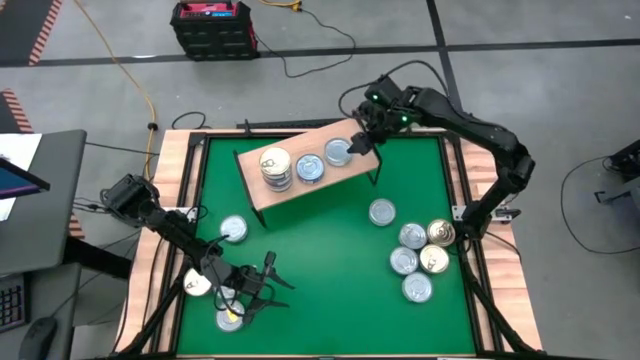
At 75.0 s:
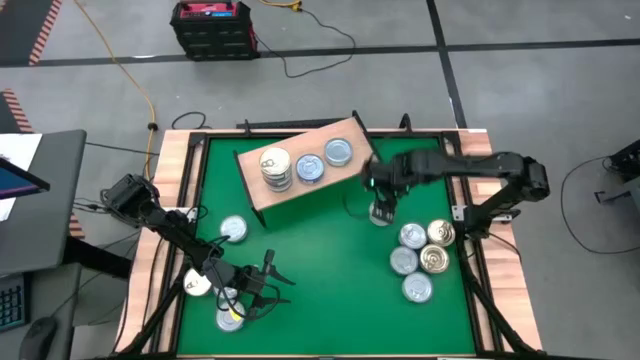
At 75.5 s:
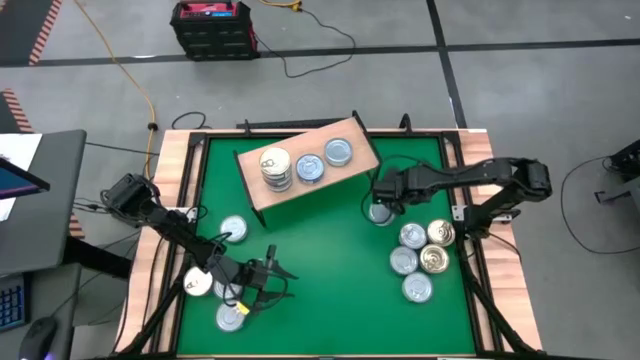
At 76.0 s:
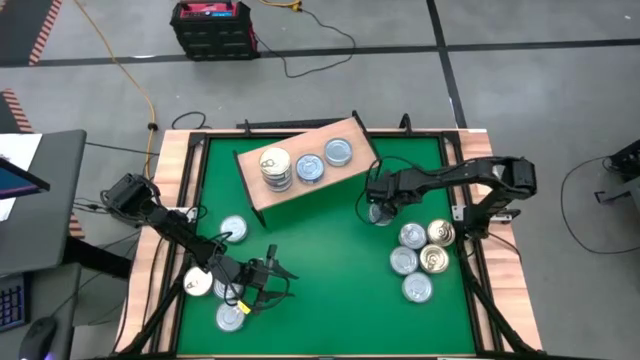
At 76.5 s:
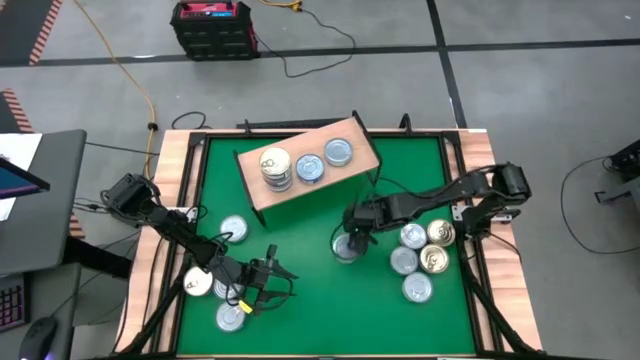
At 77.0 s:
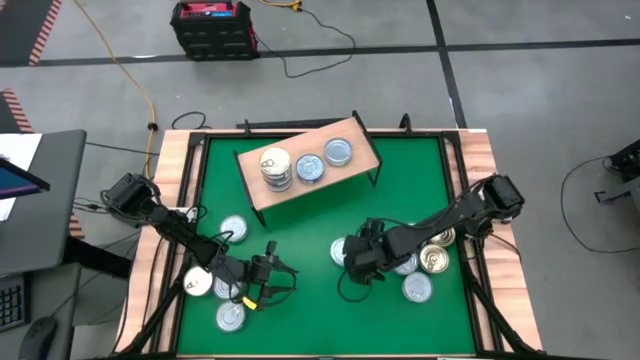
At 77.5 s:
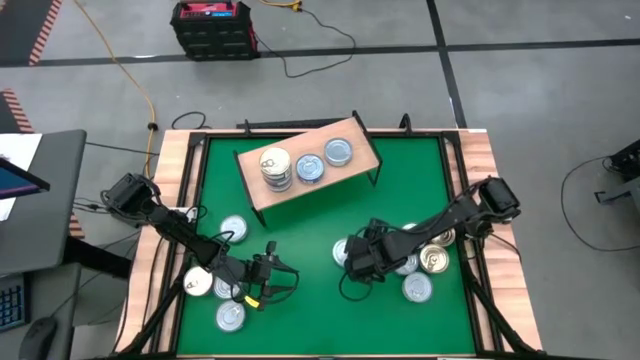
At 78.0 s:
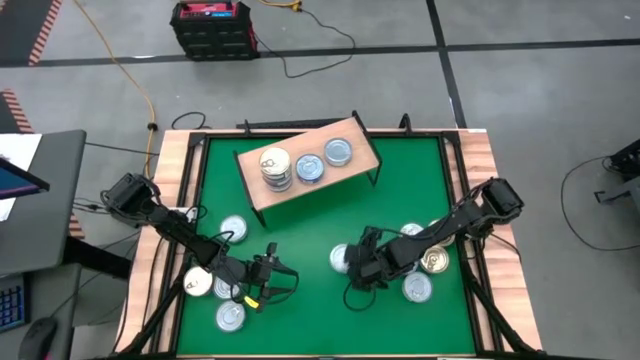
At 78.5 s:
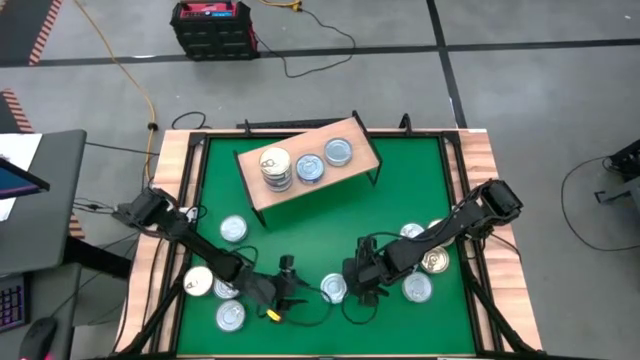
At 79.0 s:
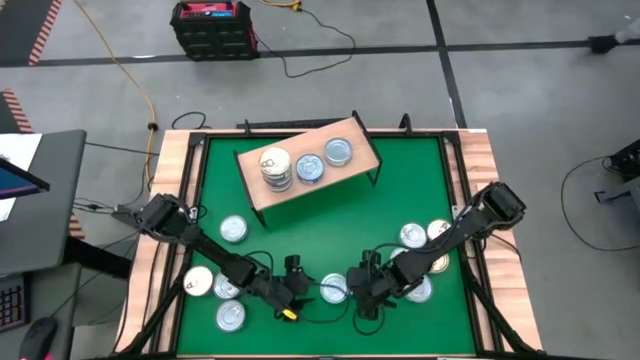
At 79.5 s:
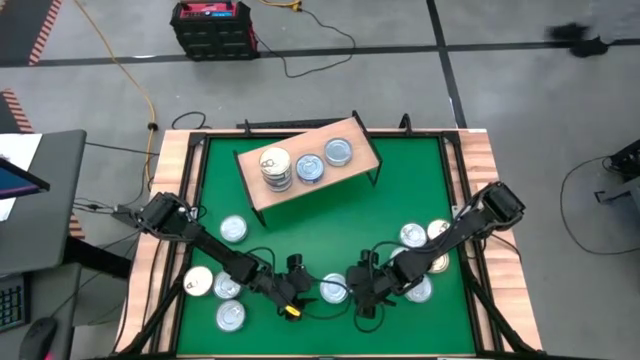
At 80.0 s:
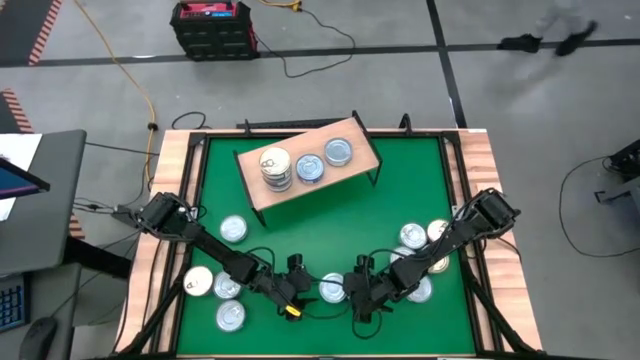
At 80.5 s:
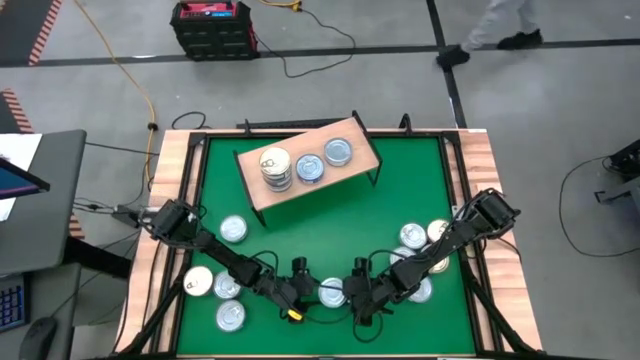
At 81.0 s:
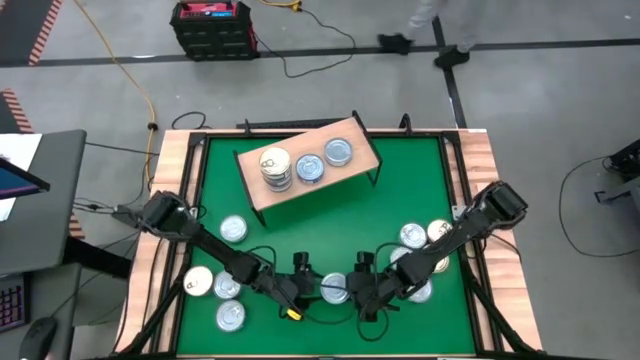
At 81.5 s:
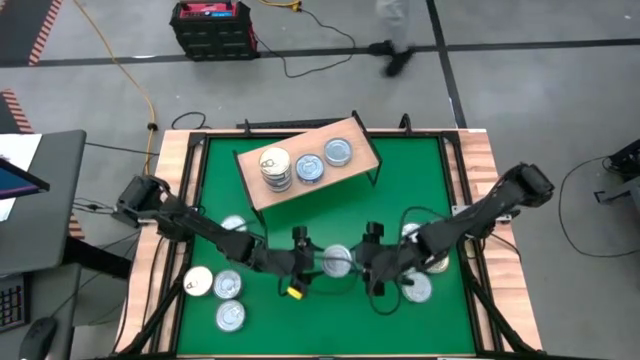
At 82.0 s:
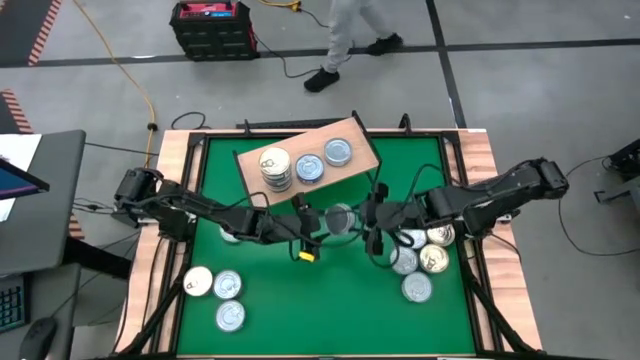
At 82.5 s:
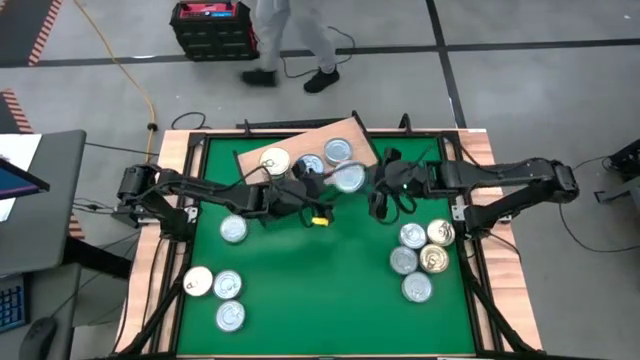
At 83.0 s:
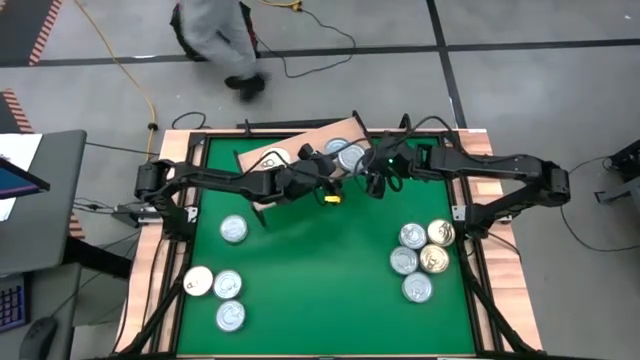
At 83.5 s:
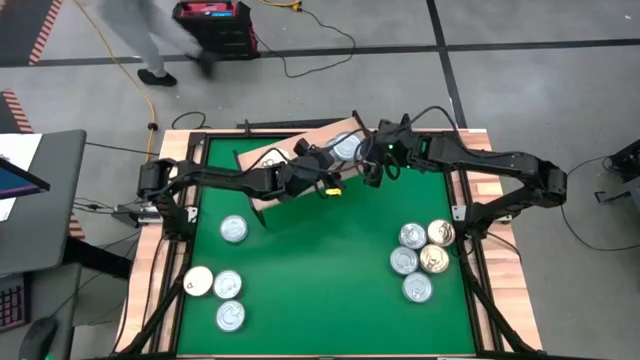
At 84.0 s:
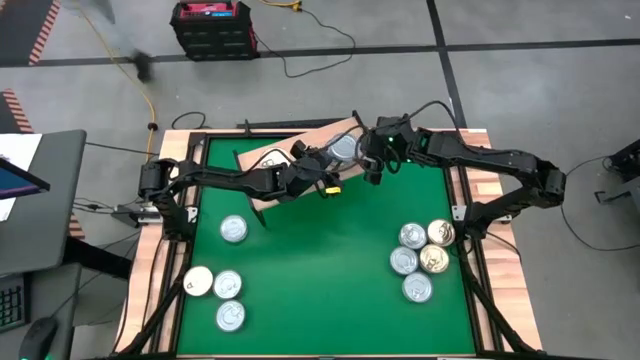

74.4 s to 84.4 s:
Task: Stack canned seafood by type on shelf
Stack the green white tuna can on top of the green white tuna can on the shelf

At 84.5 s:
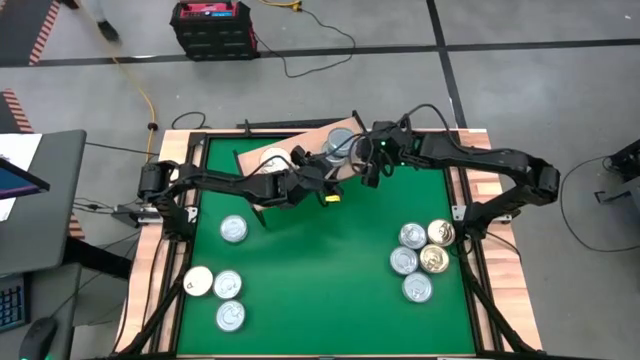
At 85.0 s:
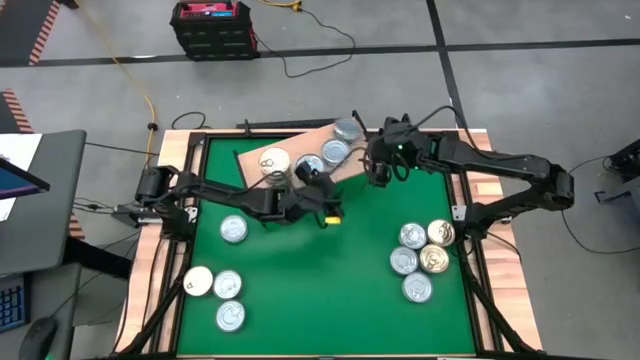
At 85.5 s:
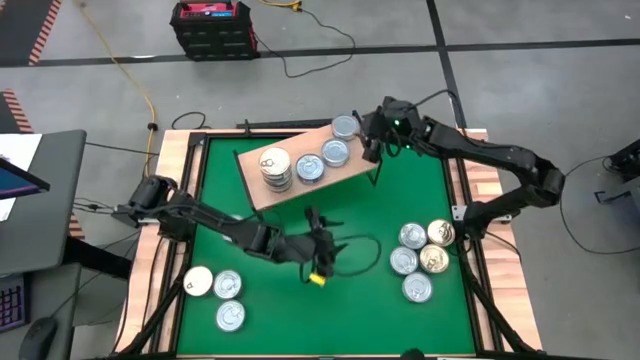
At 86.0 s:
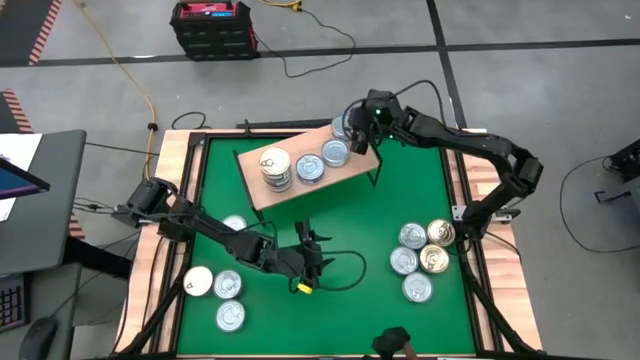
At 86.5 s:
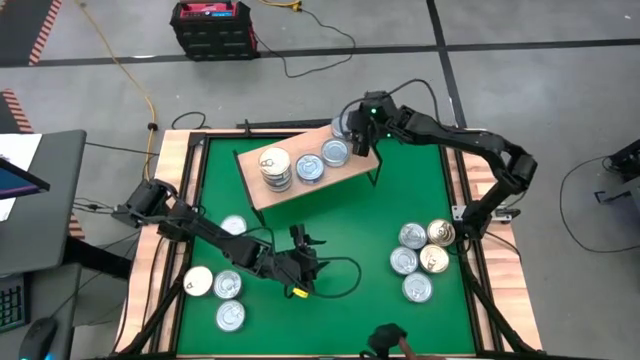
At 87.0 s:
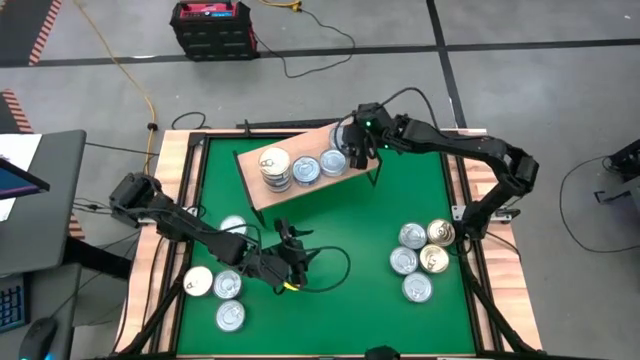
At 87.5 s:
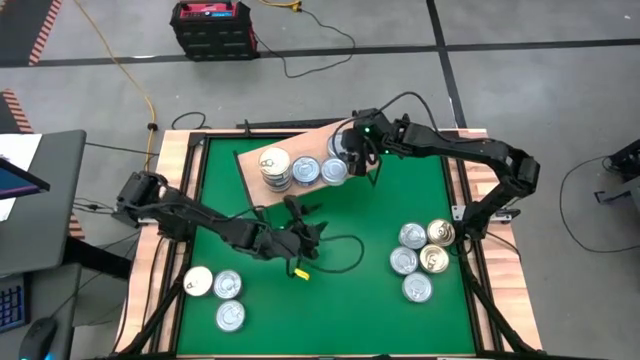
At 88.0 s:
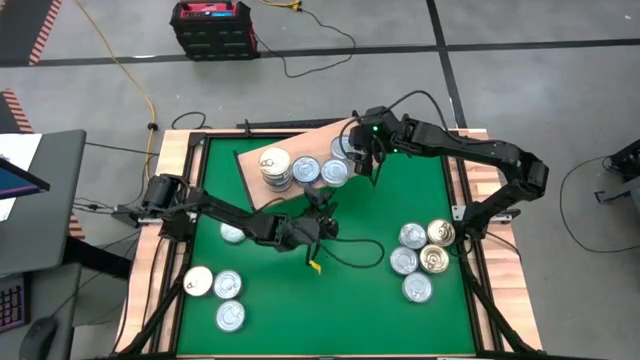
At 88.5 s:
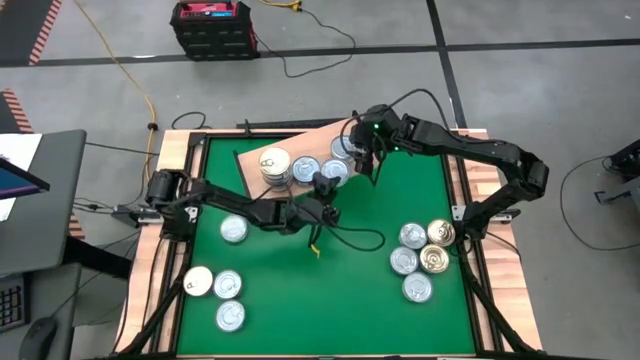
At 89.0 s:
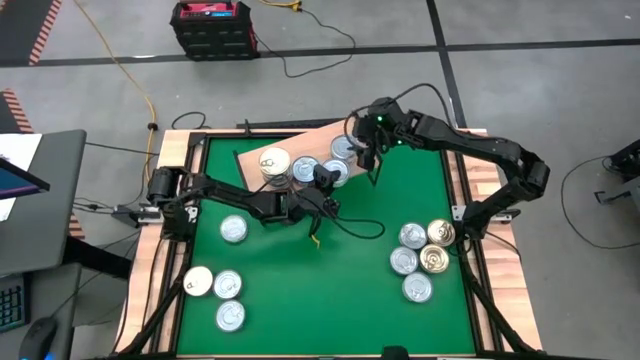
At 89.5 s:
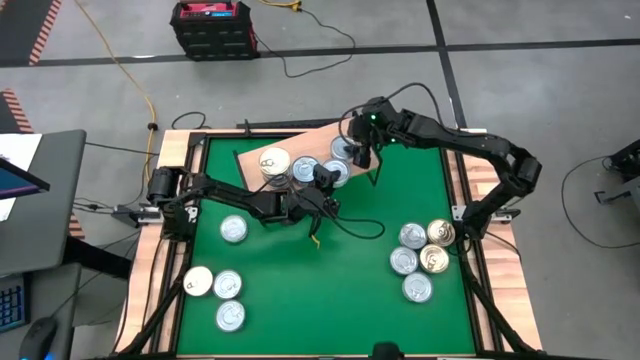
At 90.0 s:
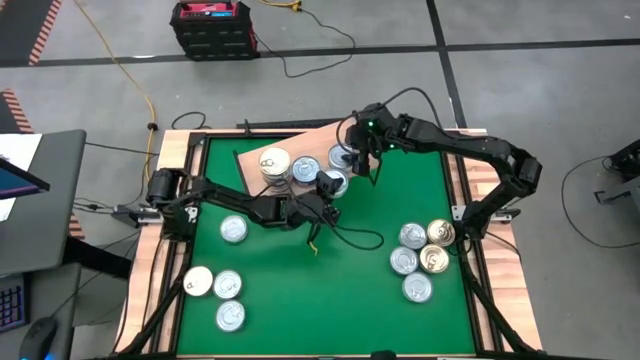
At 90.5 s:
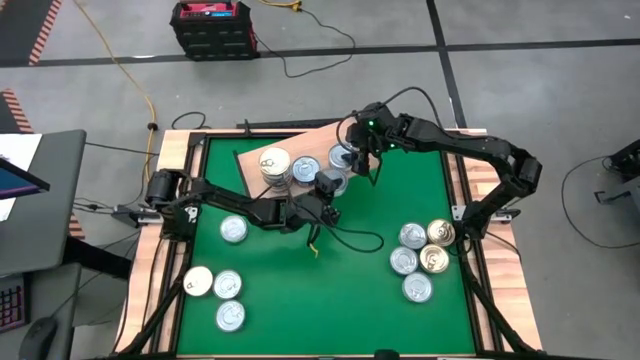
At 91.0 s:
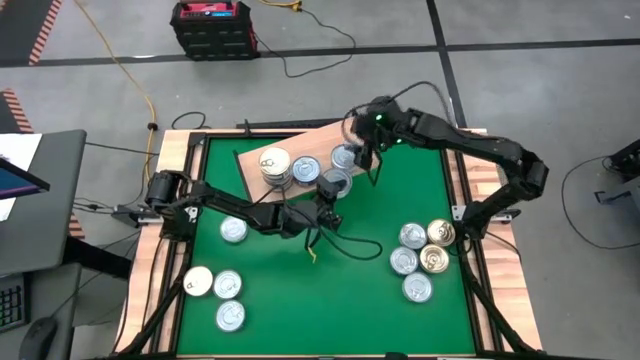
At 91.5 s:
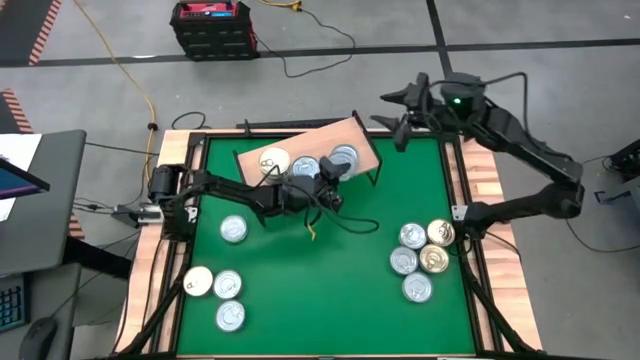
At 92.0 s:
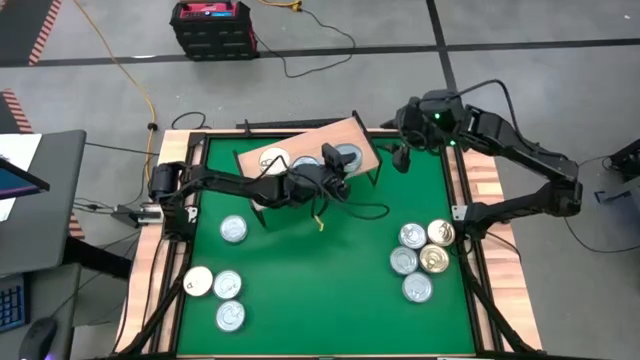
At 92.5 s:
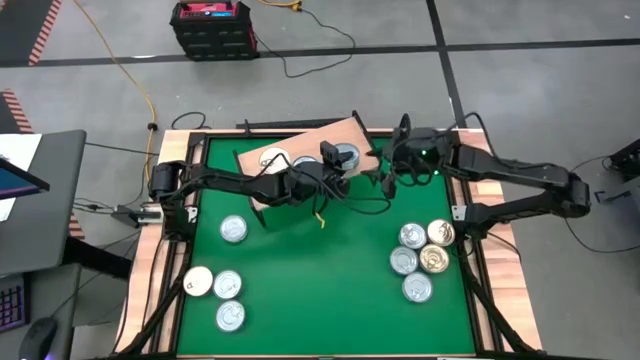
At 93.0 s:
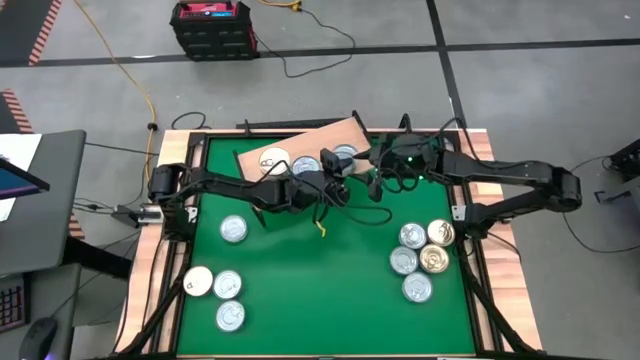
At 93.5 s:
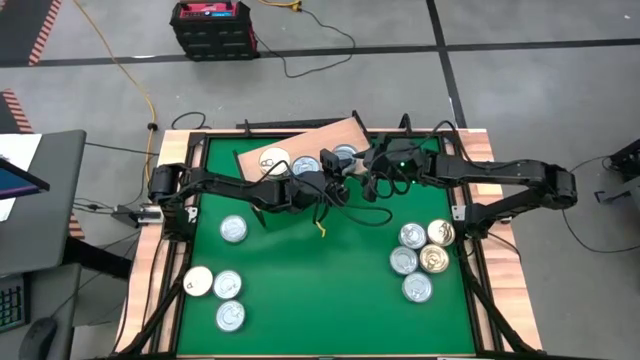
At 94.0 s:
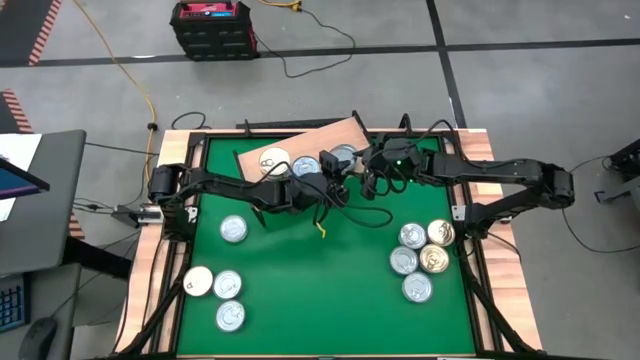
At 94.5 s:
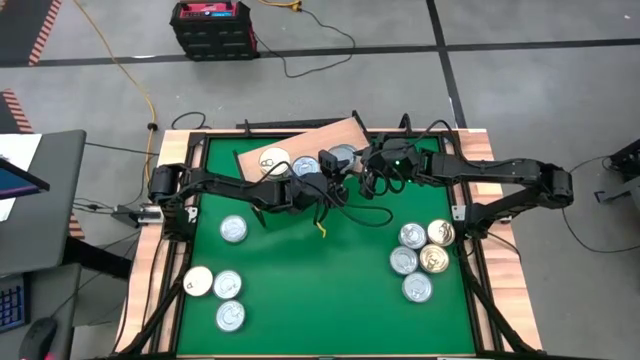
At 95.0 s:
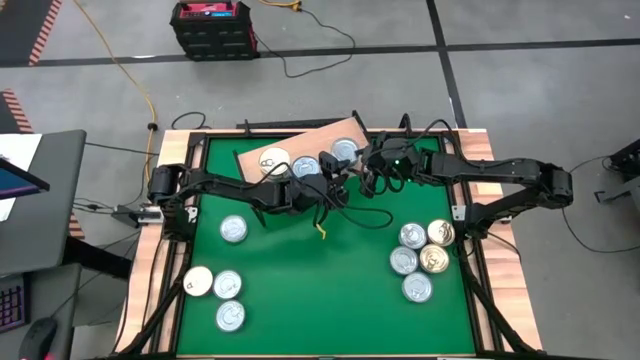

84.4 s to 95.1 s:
Stack the green white tuna can on top of the green white tuna can on the shelf
